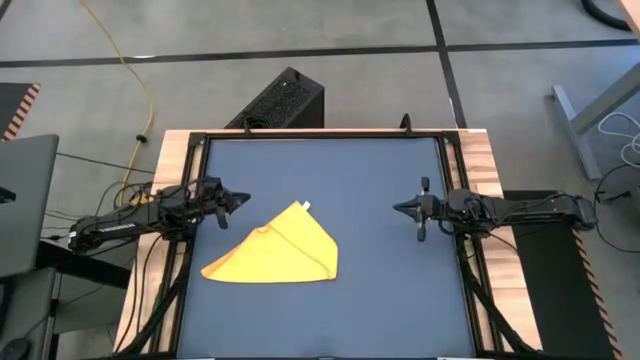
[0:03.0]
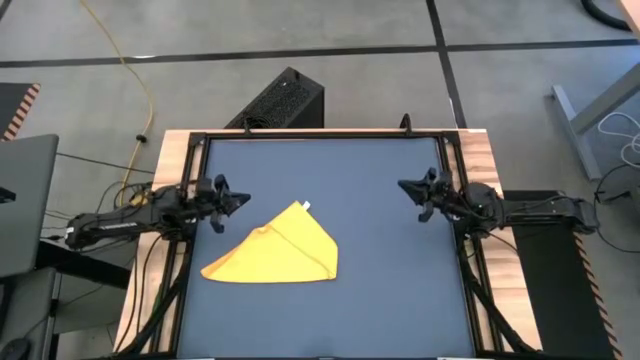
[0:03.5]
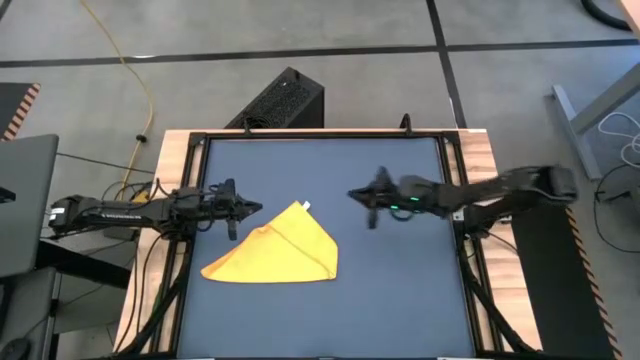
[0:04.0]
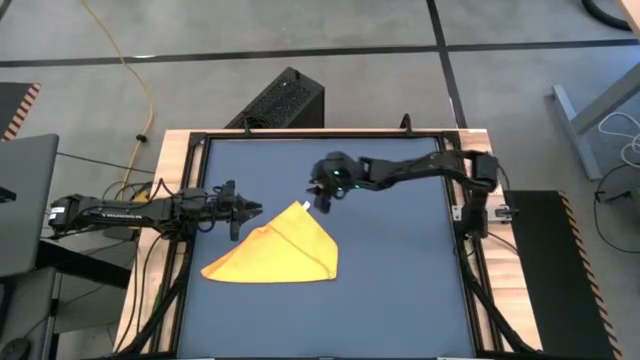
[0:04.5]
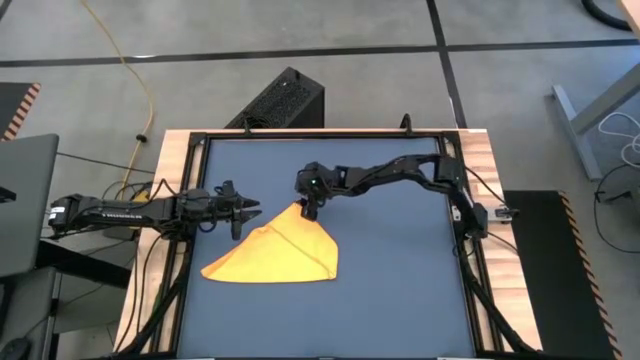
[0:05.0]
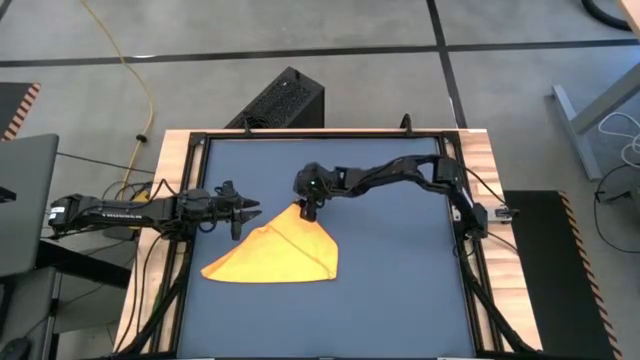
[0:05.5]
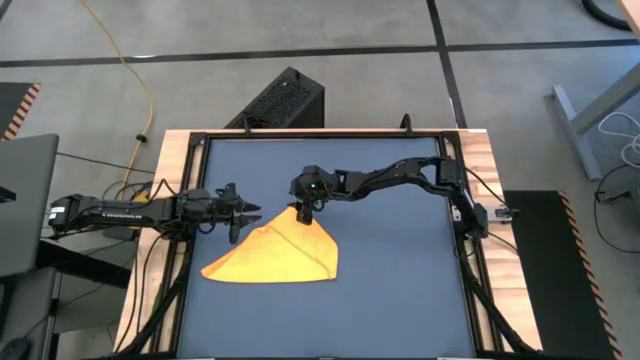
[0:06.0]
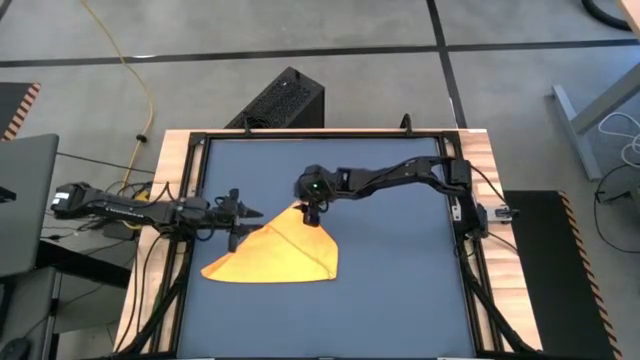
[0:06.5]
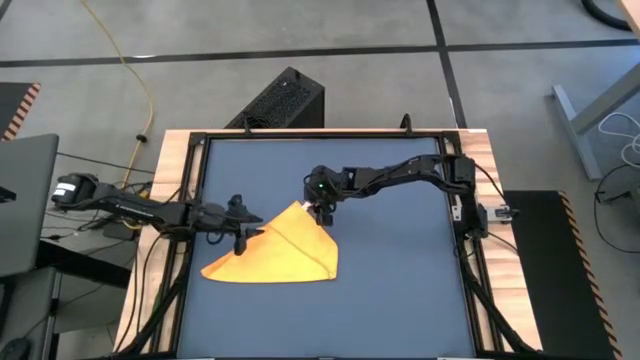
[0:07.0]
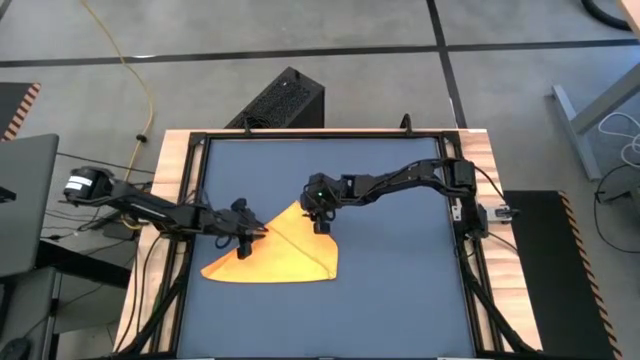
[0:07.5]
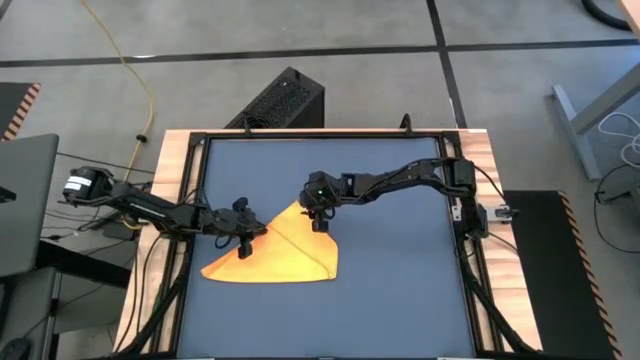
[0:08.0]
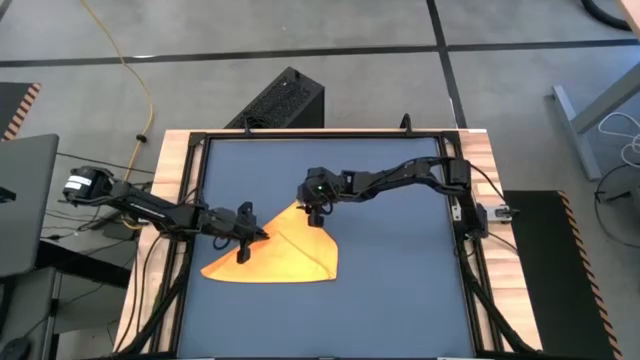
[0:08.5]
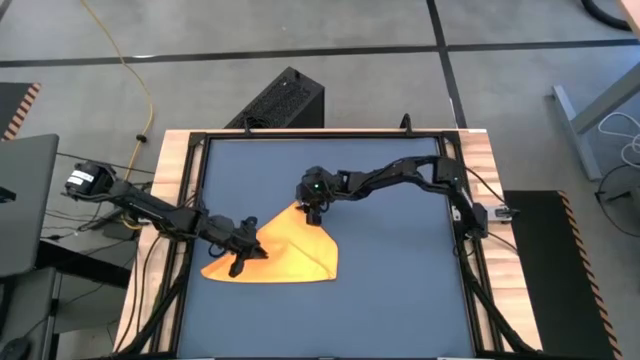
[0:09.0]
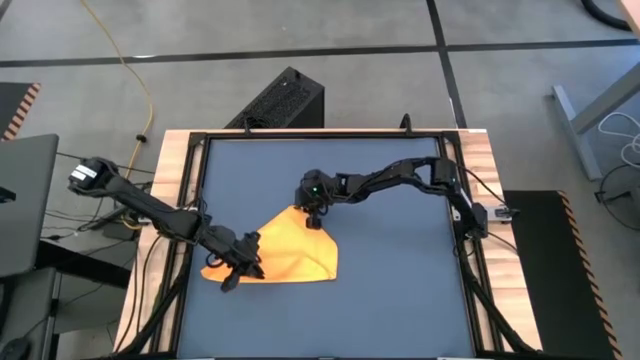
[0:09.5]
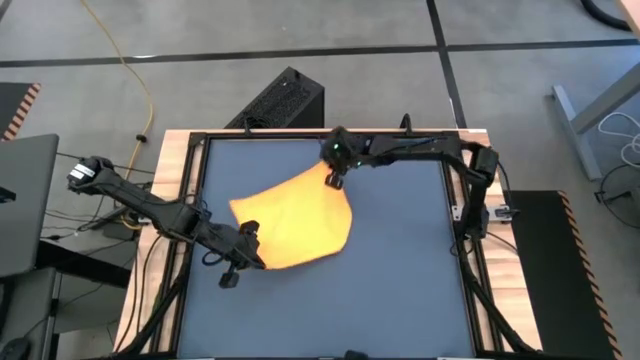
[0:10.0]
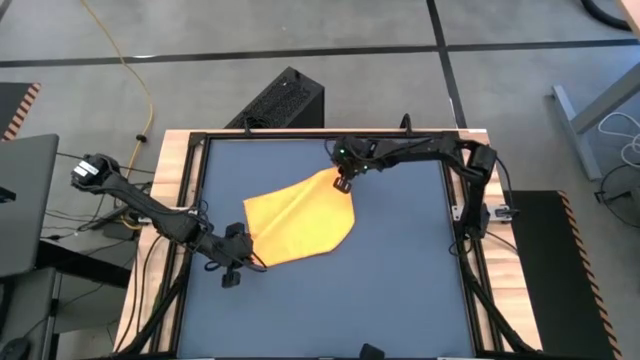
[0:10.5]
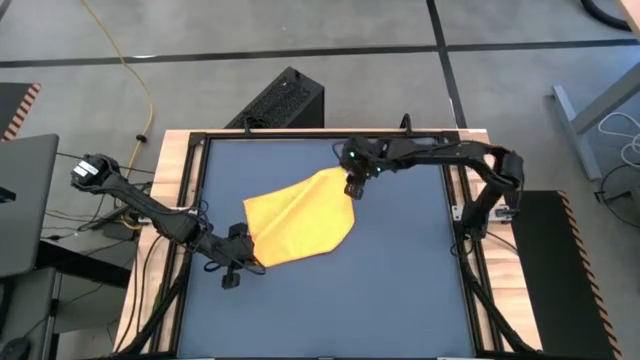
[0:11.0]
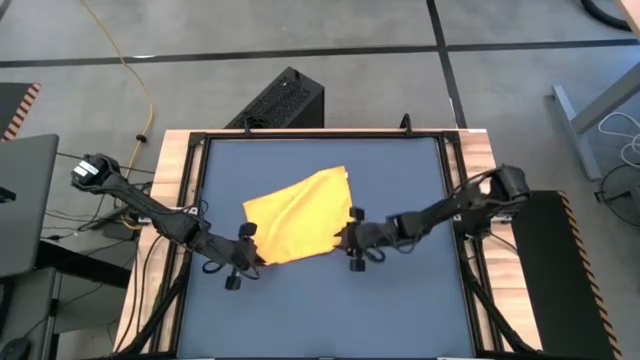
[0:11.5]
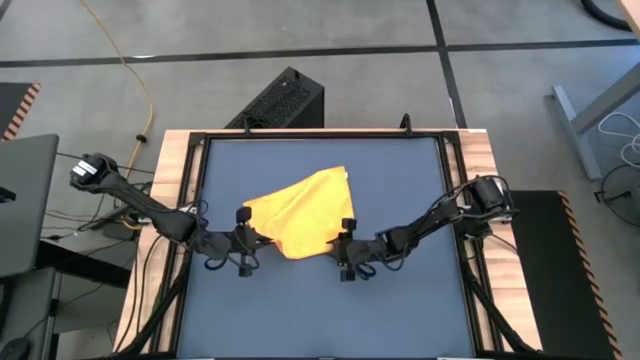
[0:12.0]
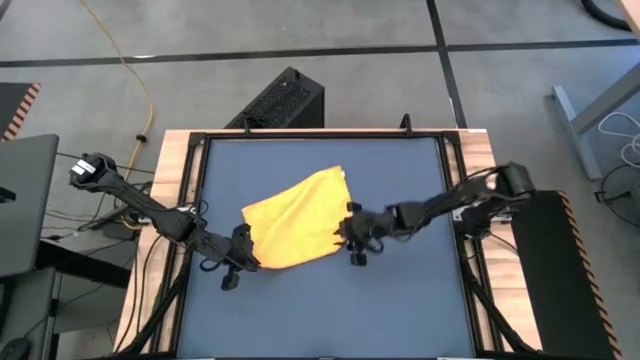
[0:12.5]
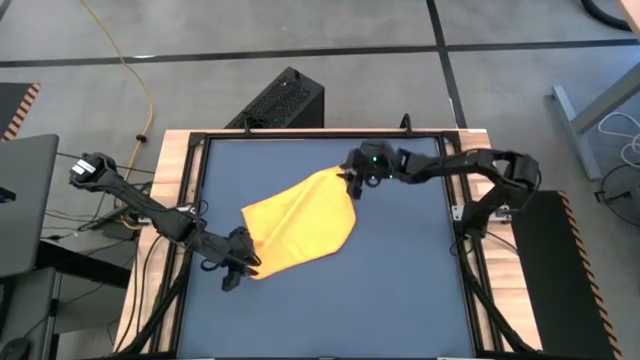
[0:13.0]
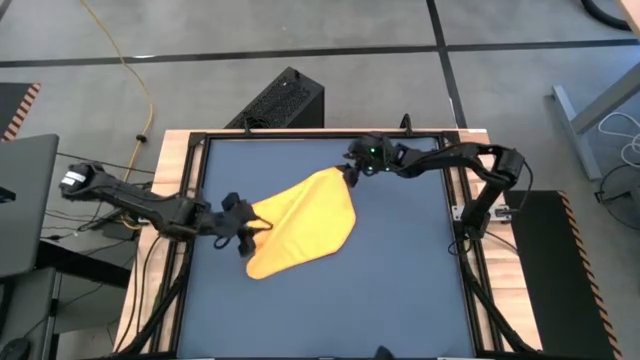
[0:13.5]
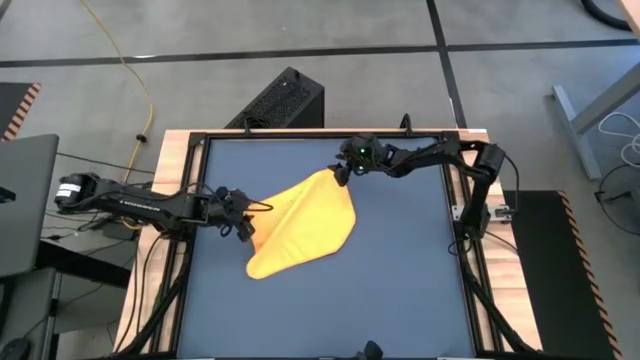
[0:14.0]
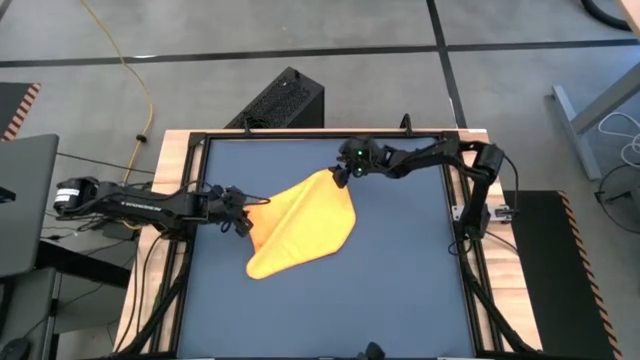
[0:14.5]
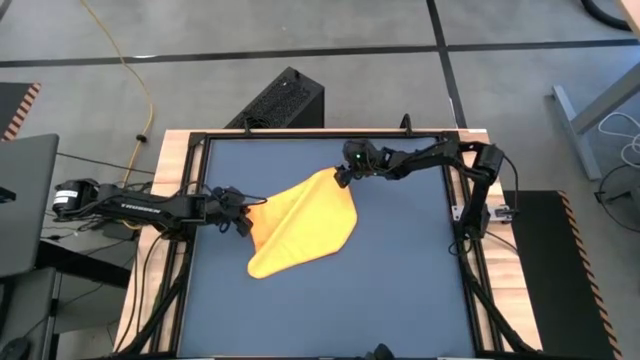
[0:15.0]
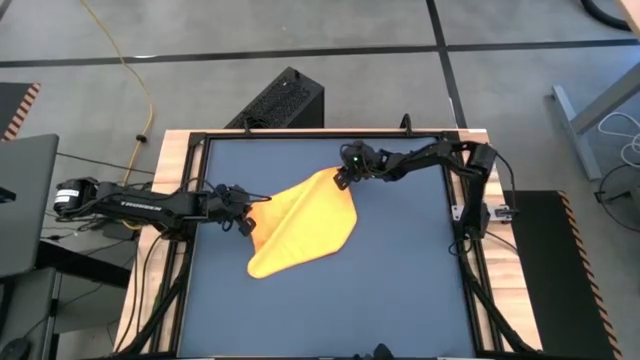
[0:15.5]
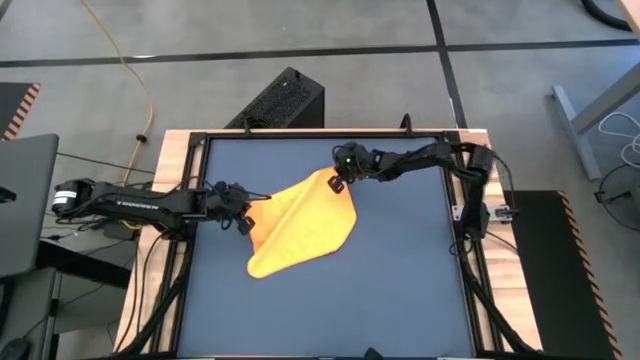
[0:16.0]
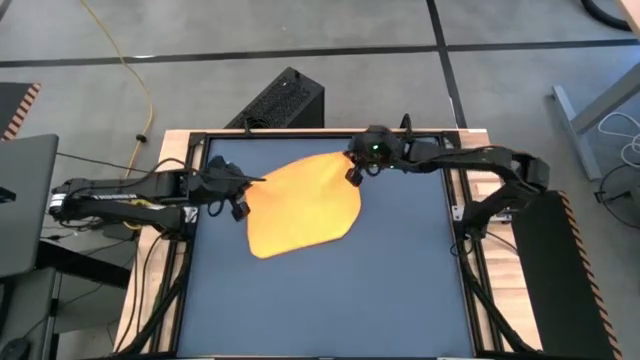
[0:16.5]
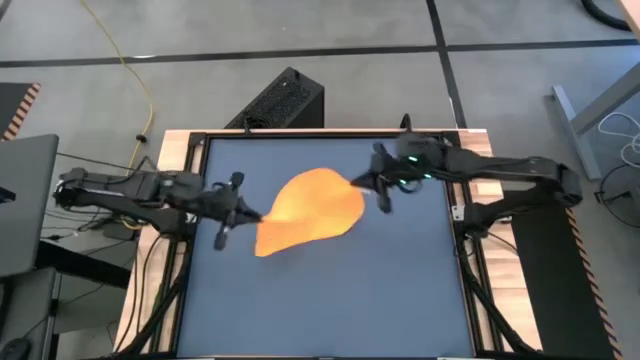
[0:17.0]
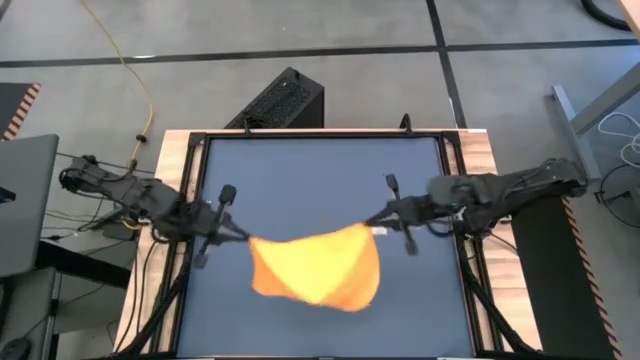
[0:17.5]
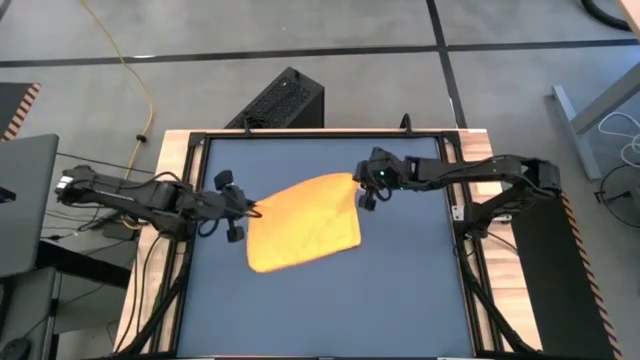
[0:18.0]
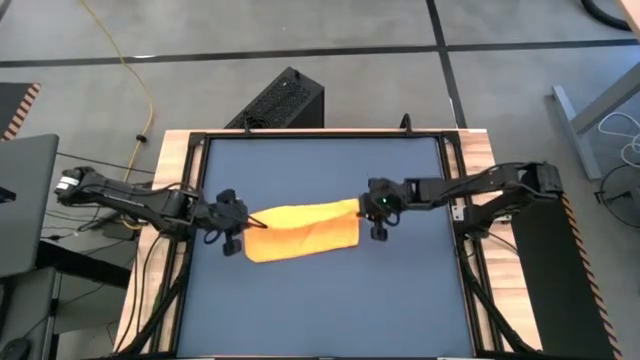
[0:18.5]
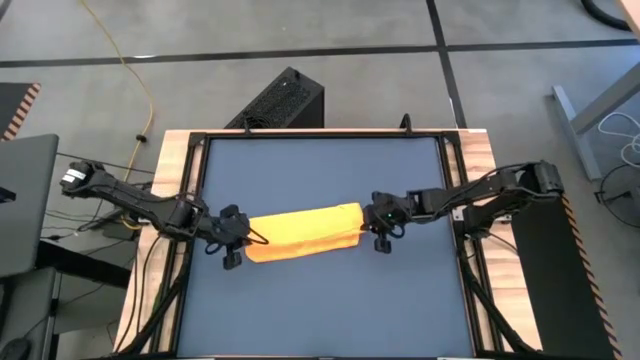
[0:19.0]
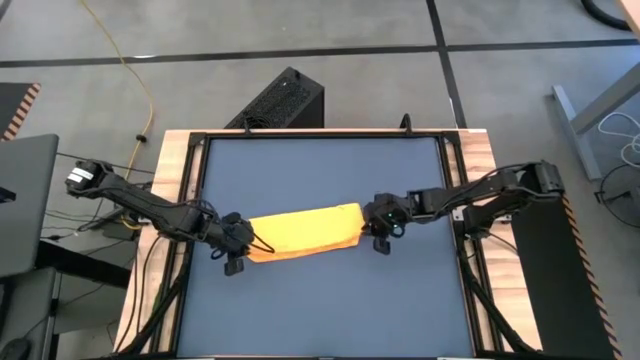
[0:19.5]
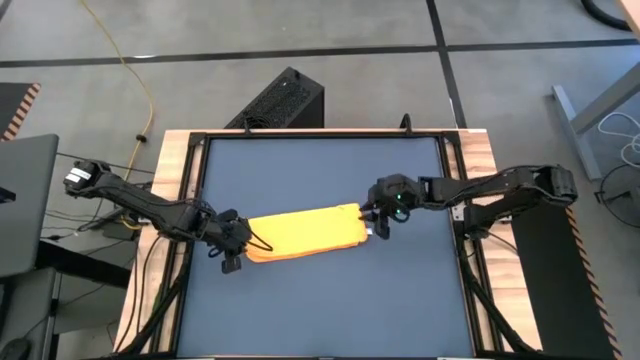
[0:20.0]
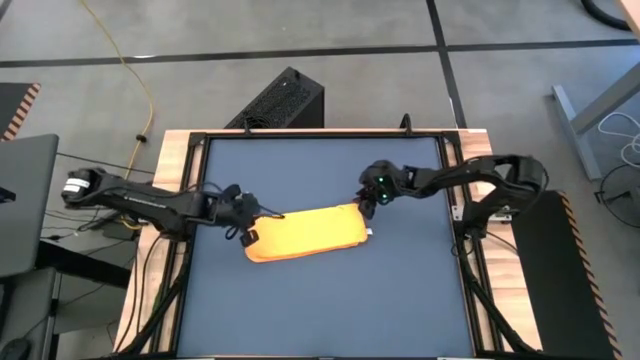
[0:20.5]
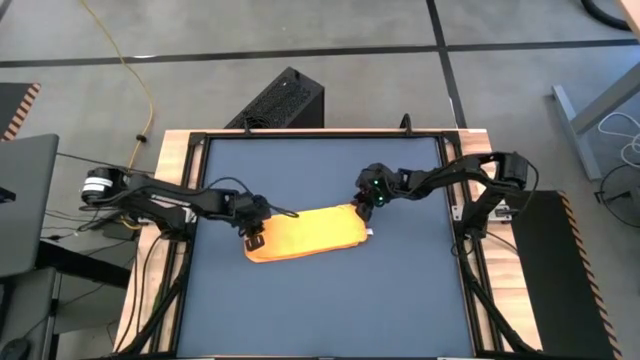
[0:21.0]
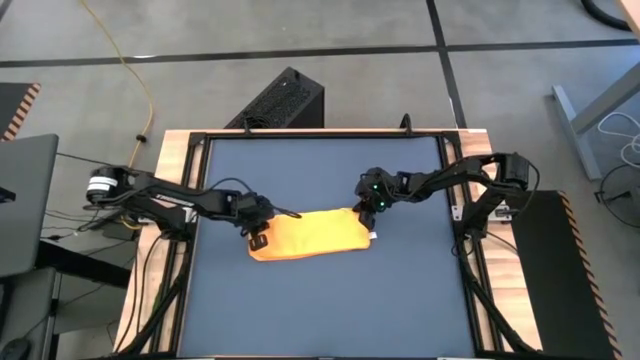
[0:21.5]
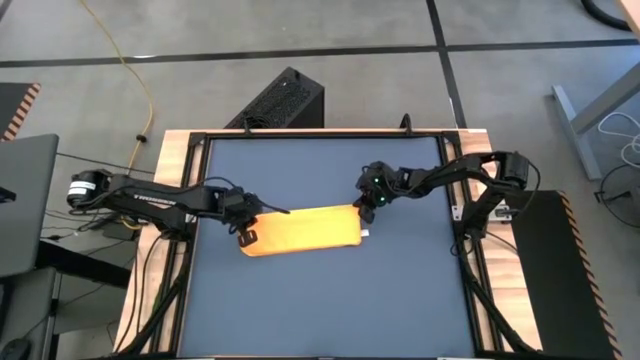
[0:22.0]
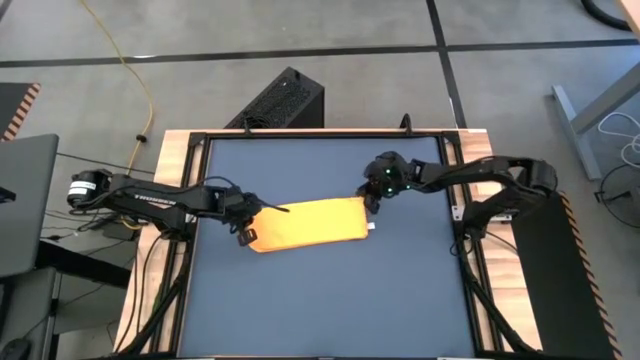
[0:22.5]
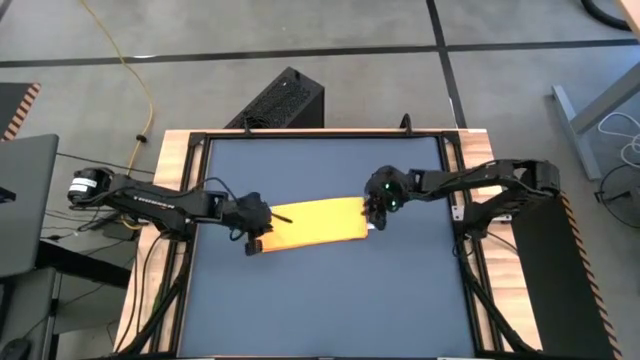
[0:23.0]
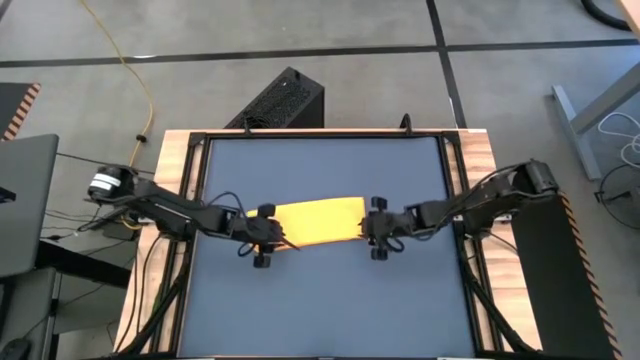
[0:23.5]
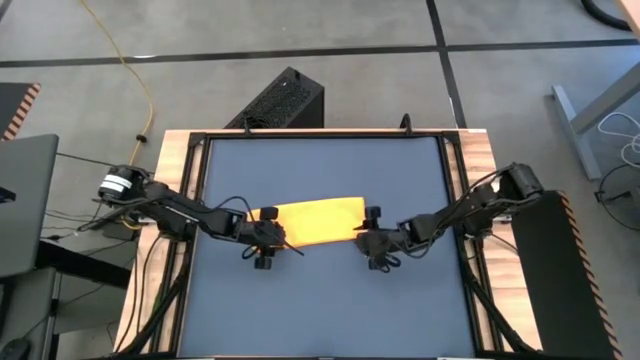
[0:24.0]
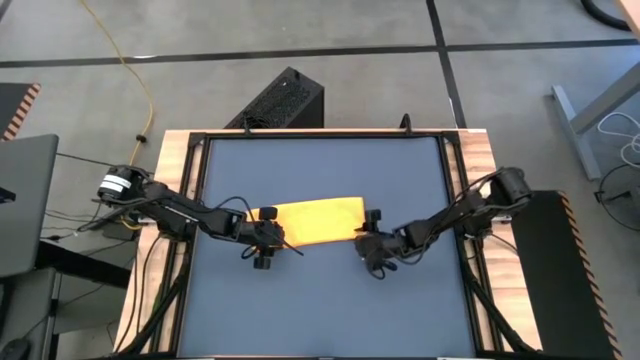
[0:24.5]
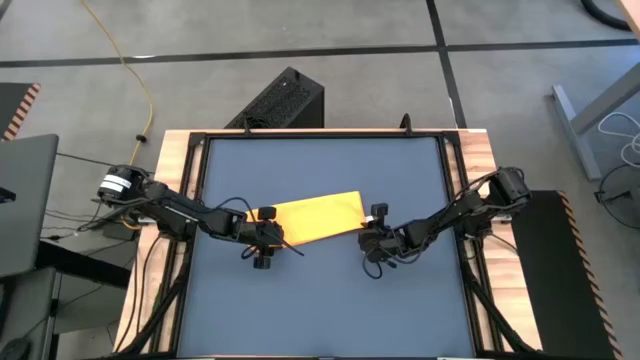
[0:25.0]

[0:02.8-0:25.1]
Task: Roll towel
Roll the orange microfiber towel
